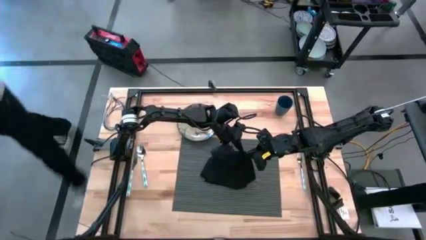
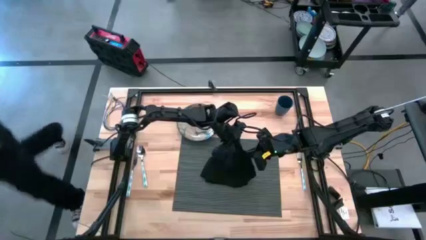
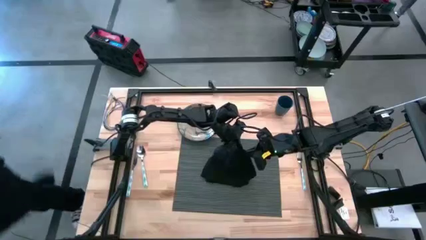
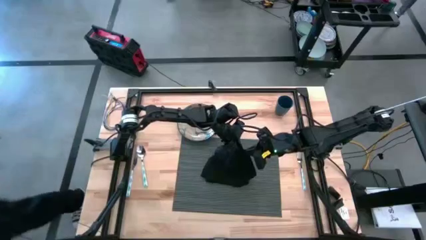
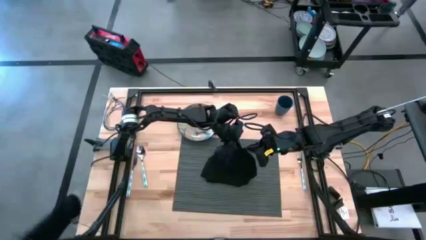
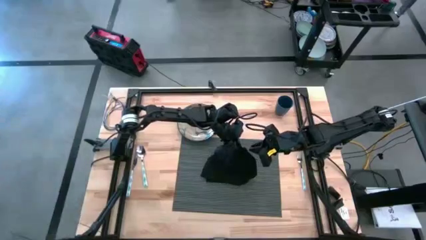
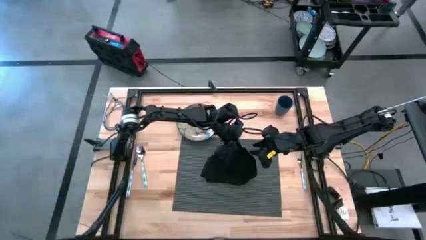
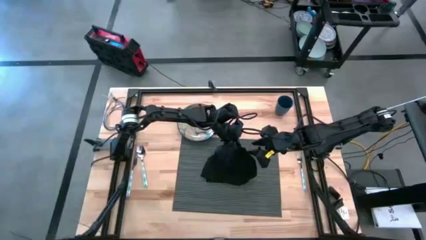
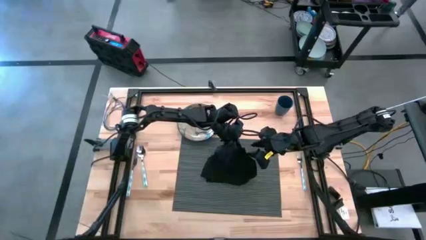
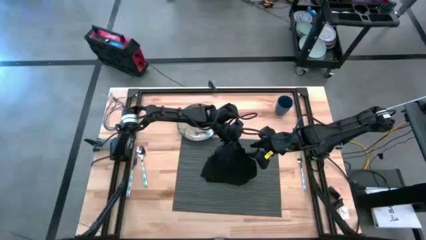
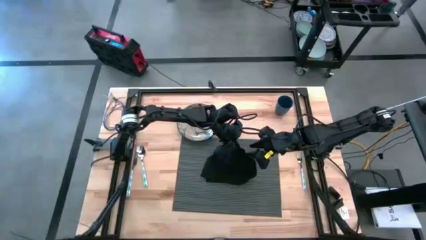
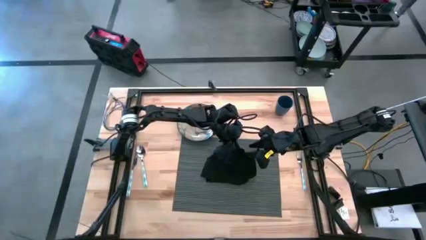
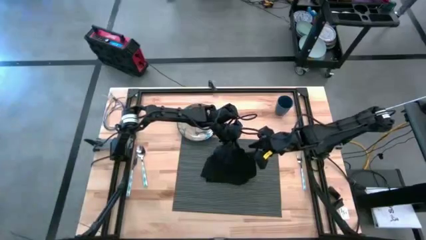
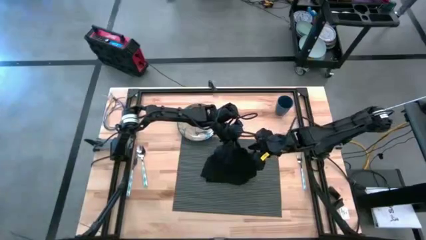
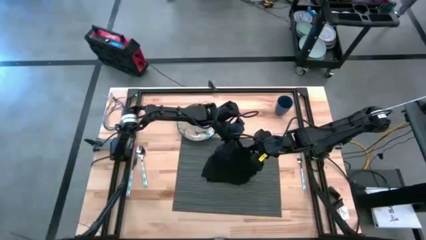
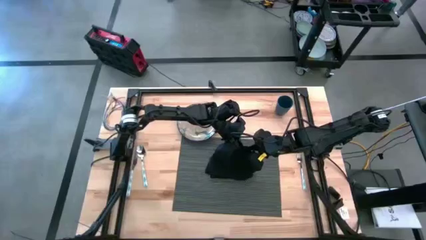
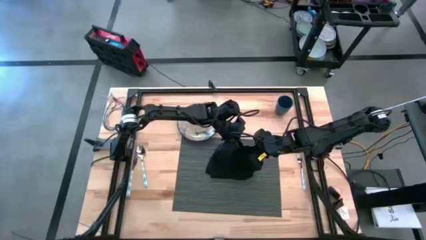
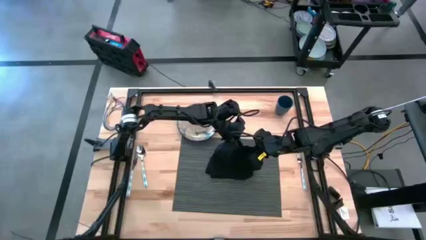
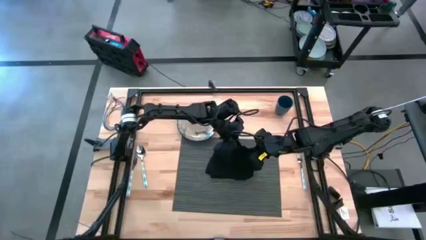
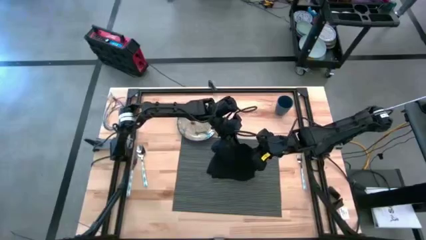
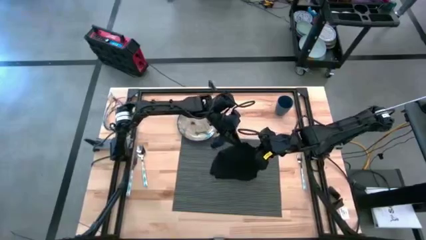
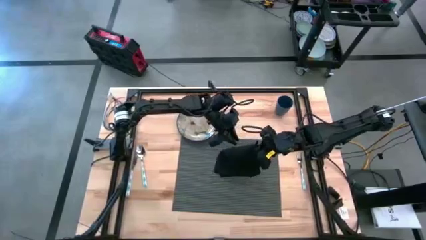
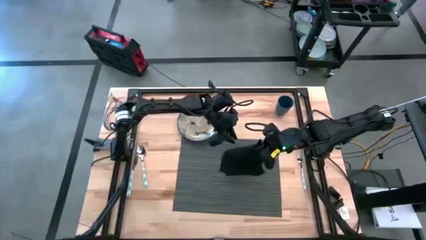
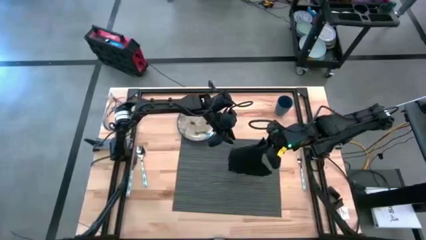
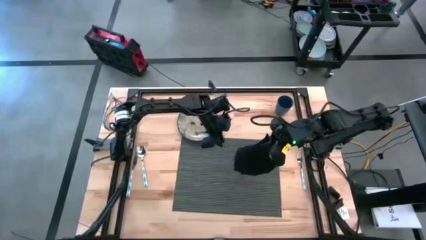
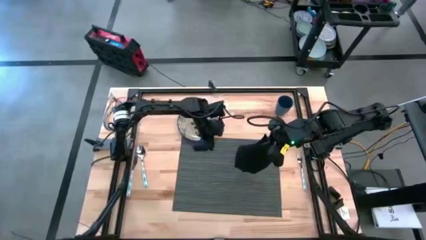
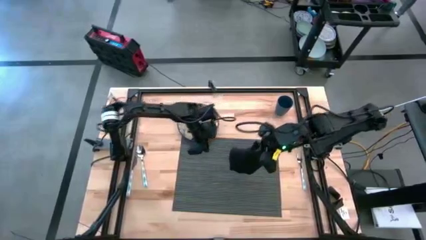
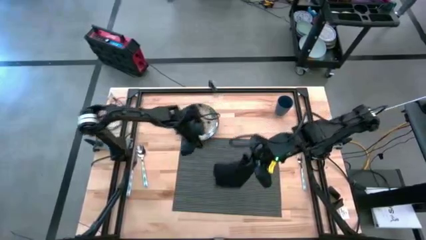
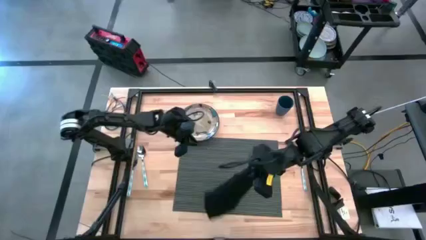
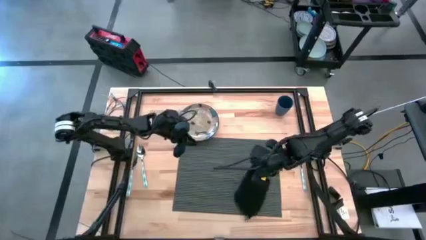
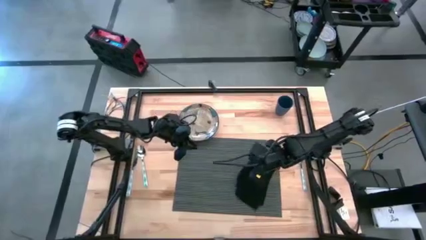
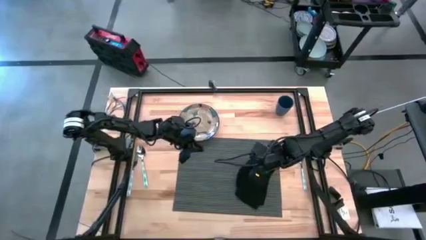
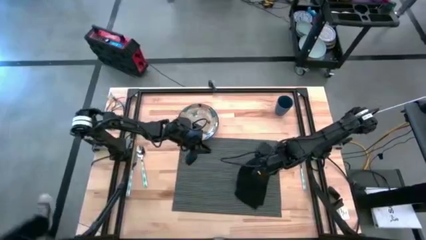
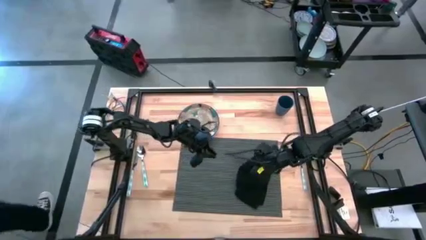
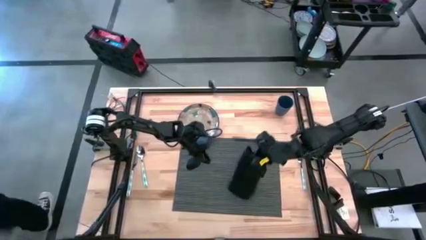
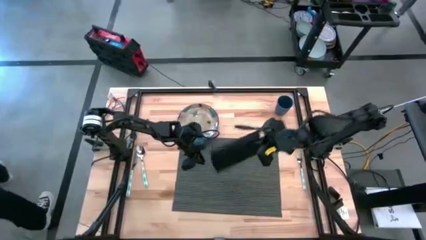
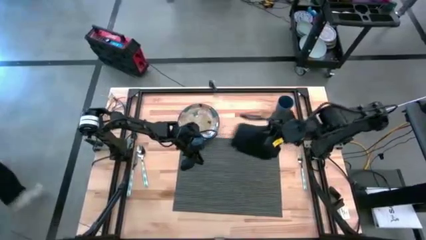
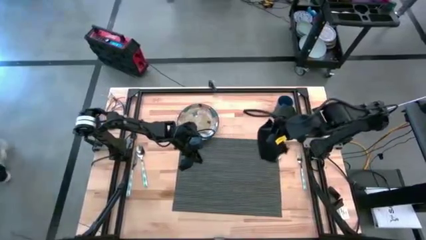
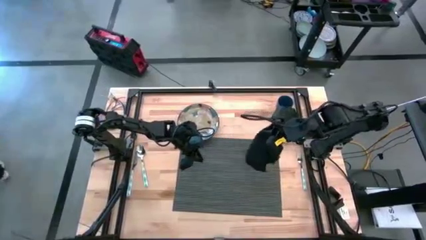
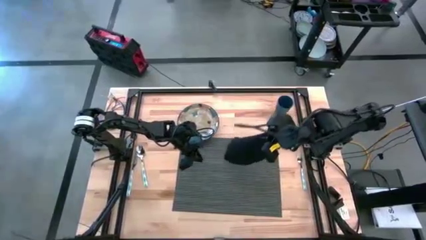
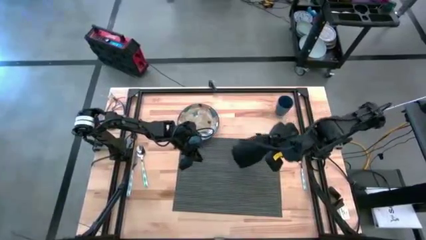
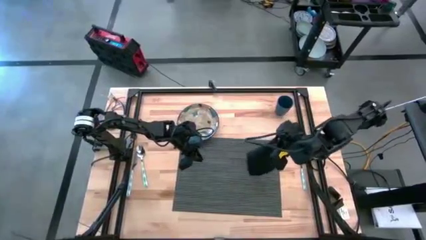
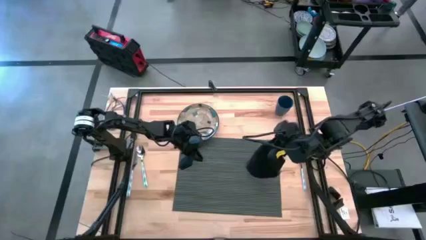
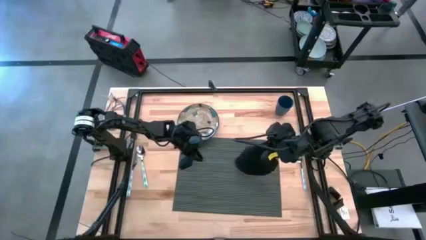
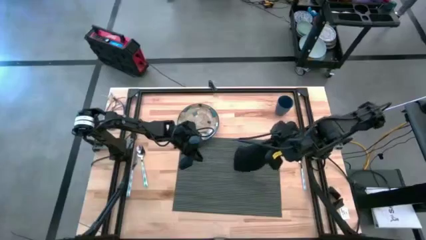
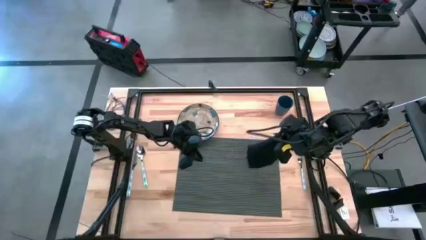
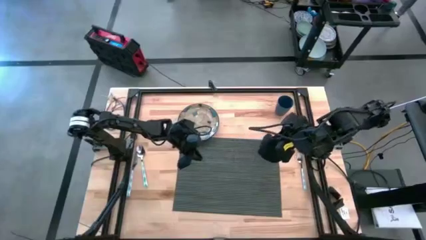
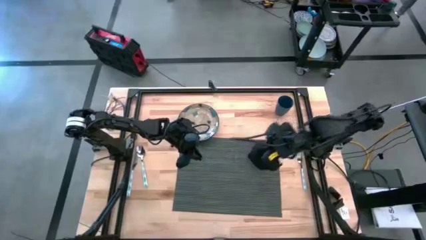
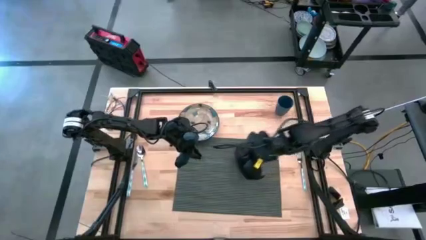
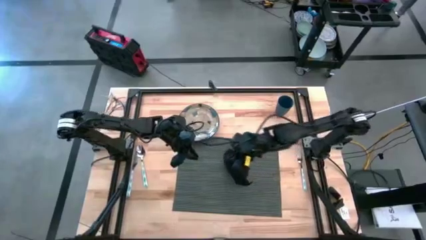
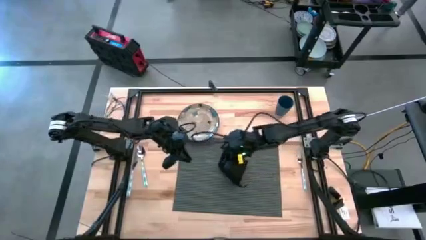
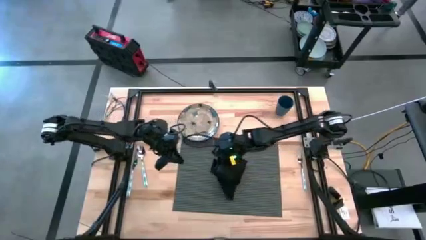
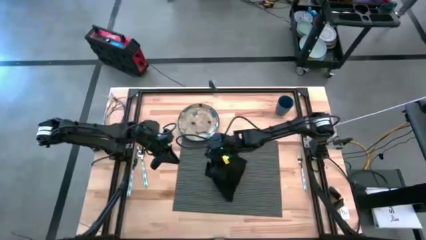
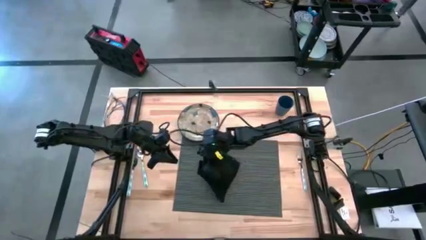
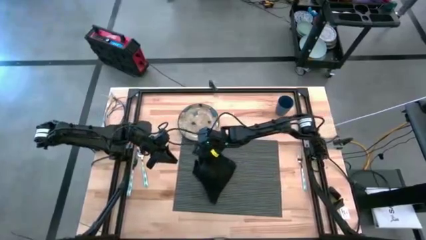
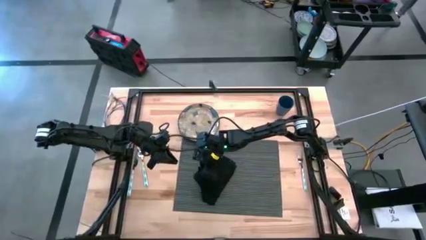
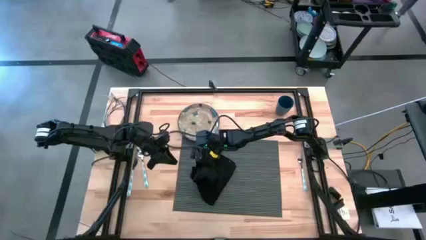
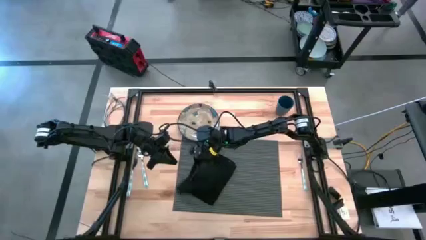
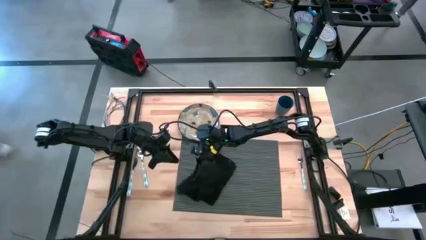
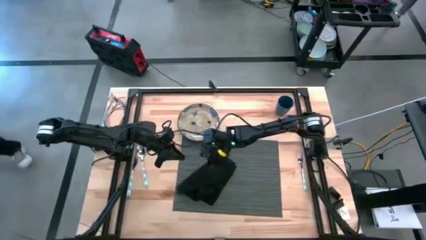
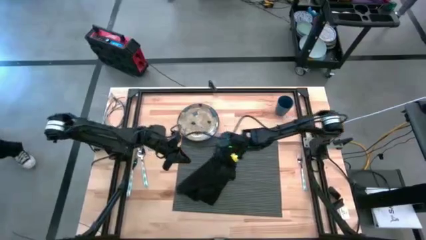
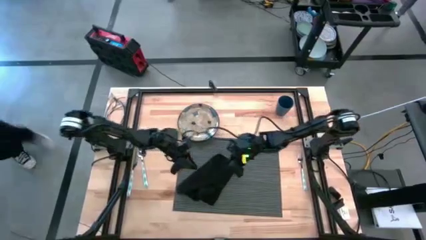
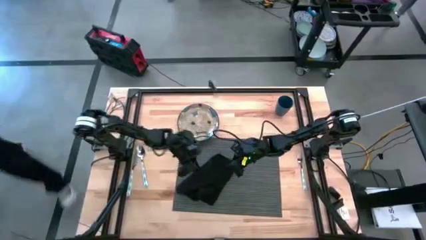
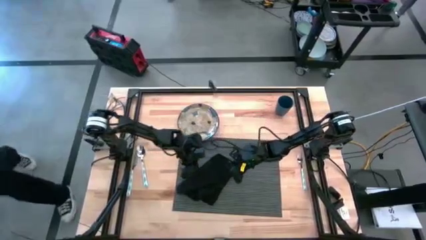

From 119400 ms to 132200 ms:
Task: Set table place
Fold the black napkin

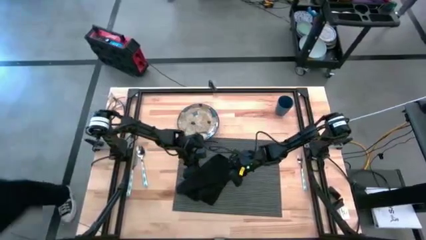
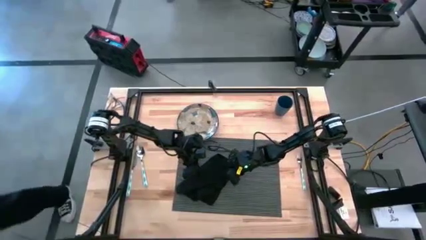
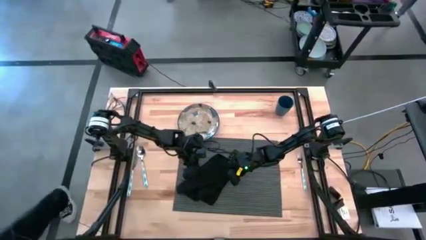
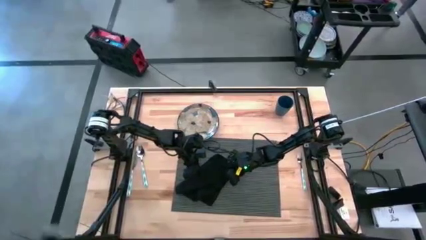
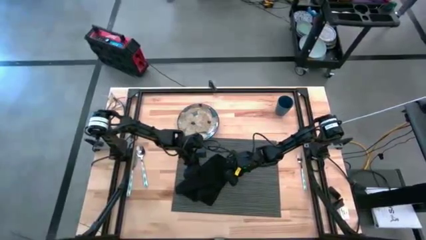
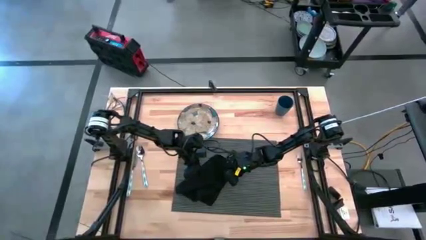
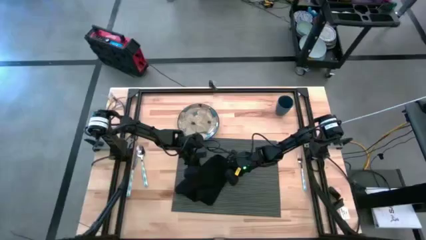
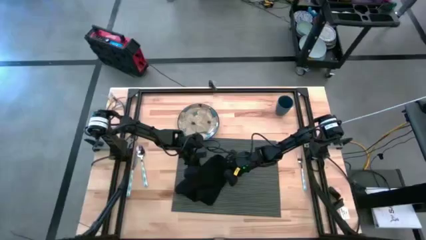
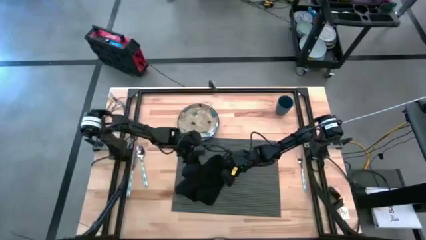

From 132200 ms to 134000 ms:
Fold the black napkin

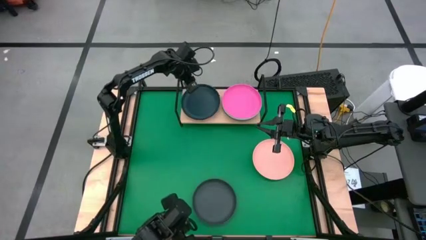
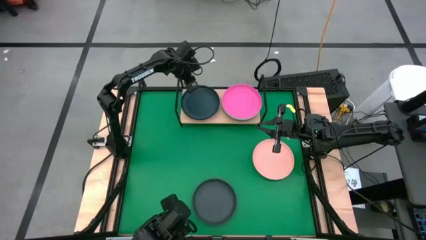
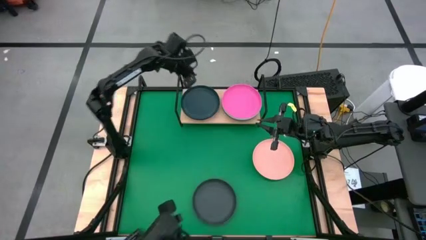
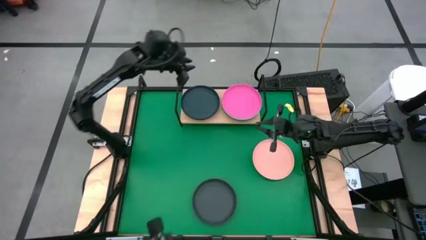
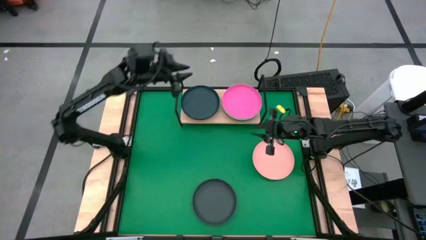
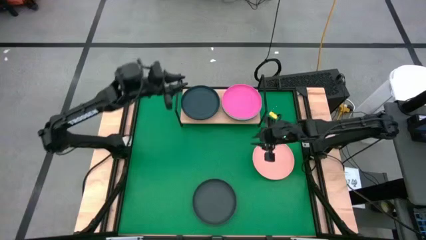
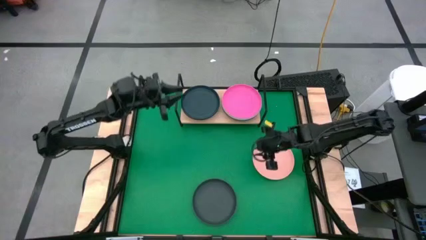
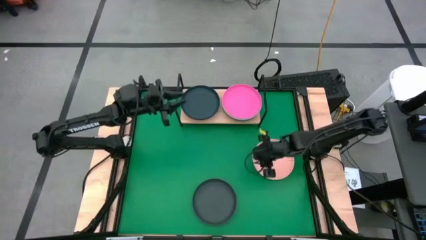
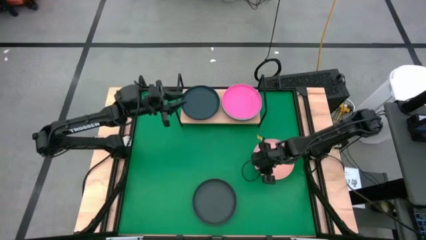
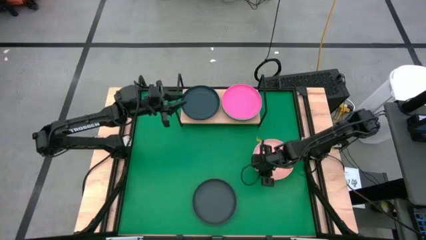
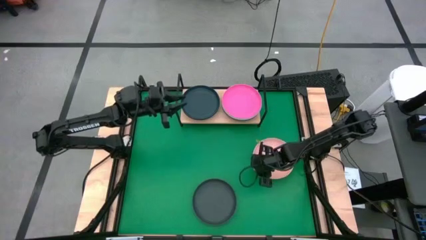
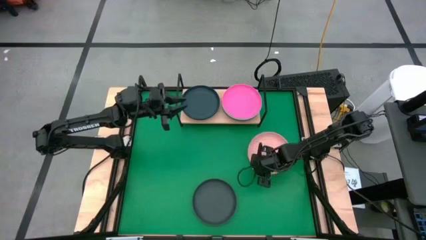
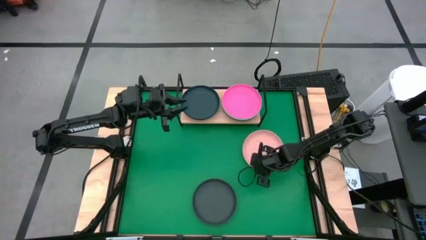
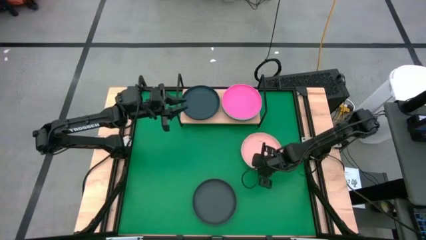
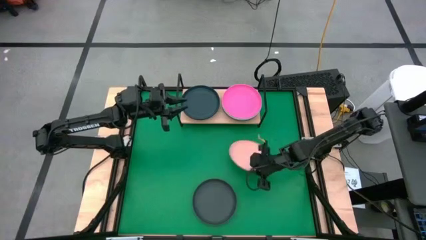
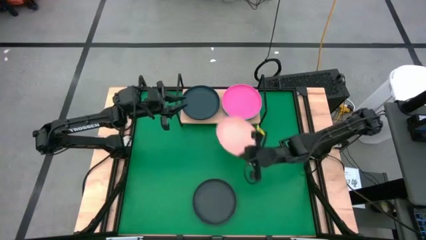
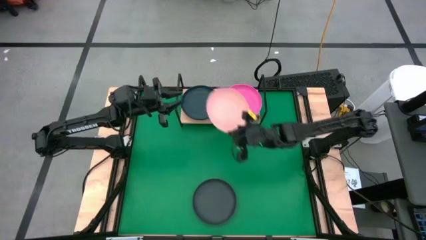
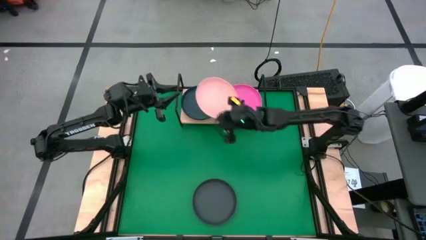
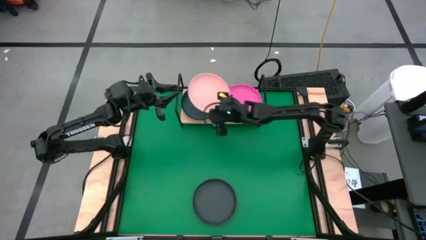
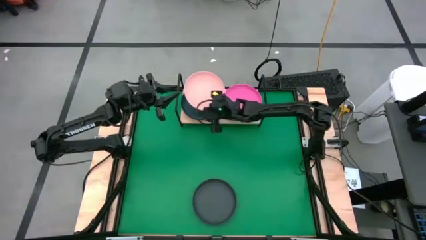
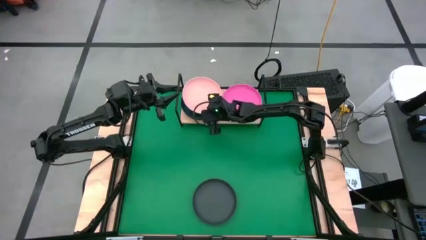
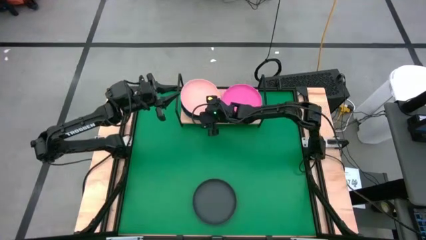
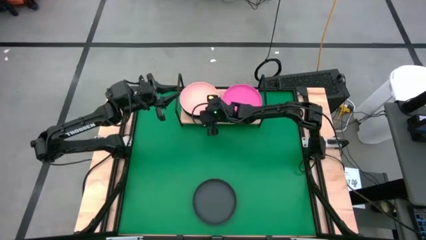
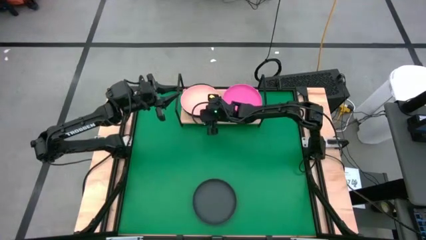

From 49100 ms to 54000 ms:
Task: Place and stack plates onto a shelf
Stack the light orange plate on top of the dark blue plate on the shelf
